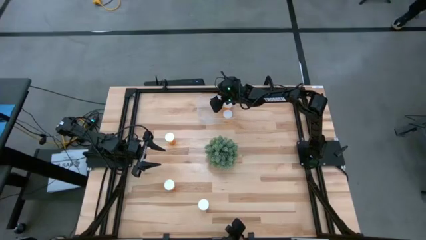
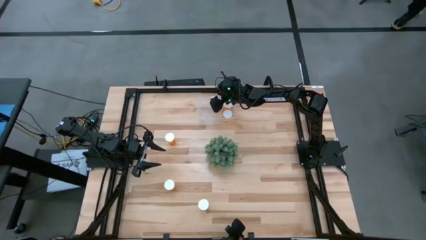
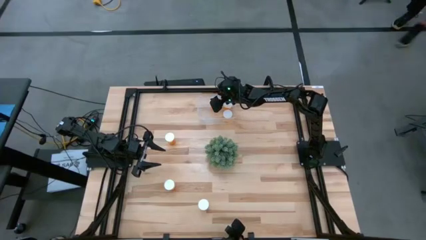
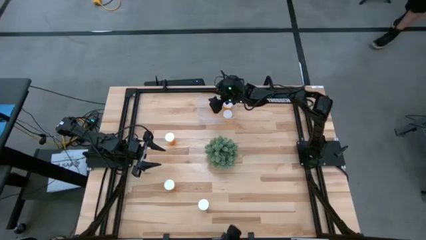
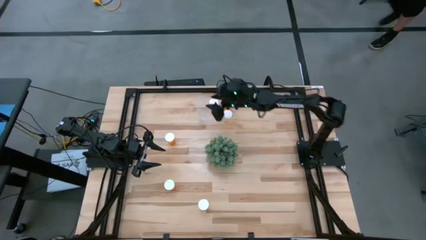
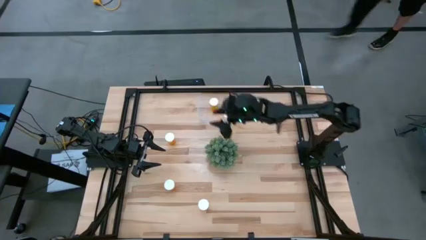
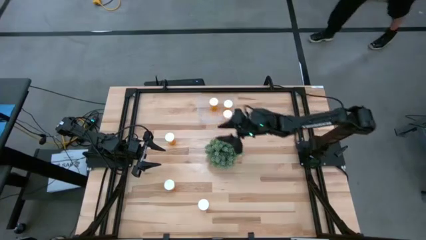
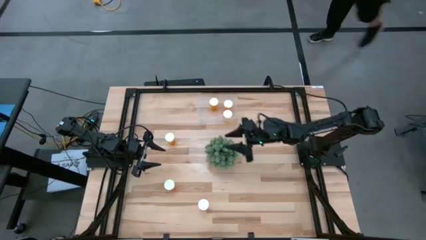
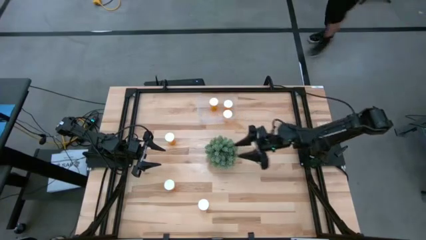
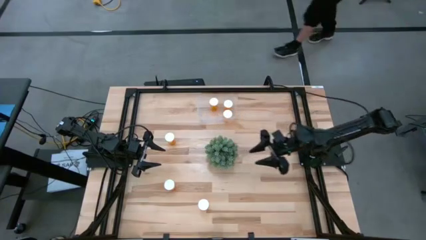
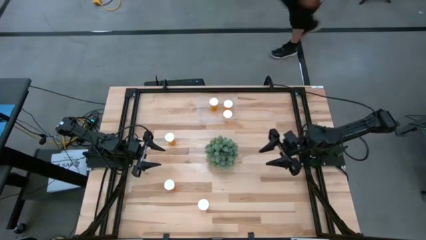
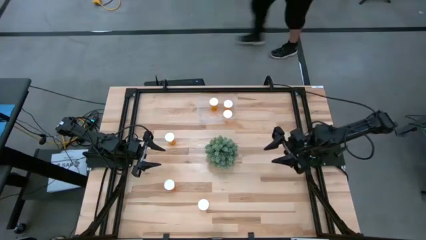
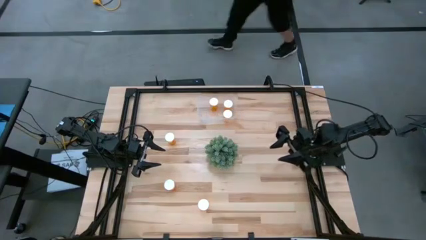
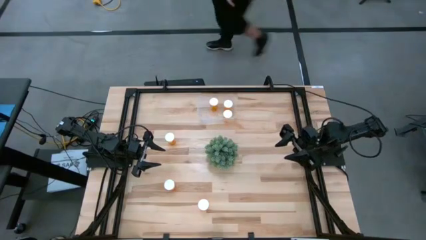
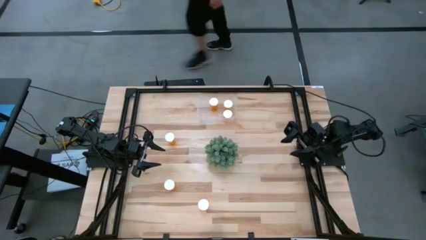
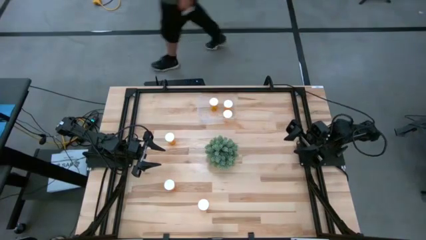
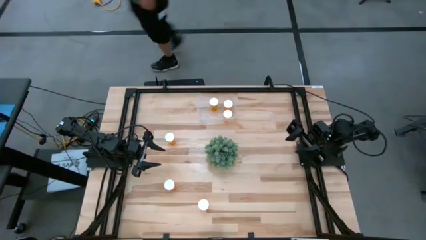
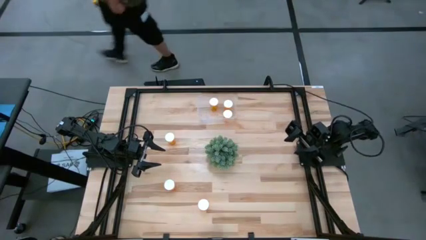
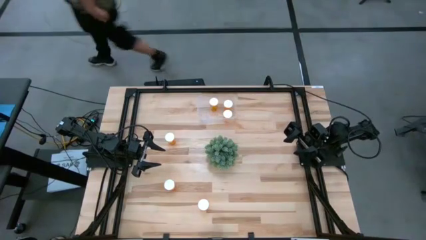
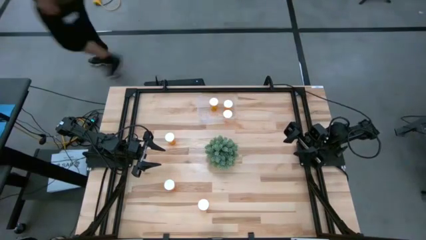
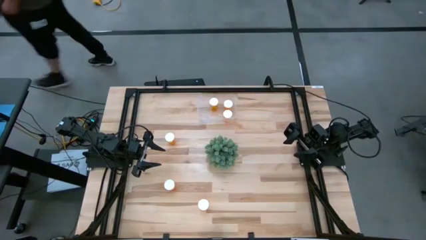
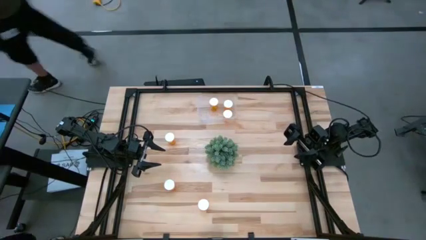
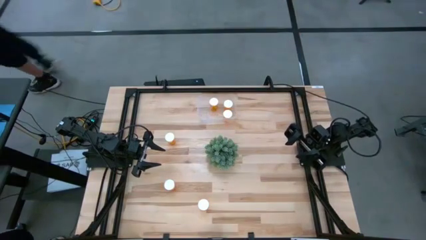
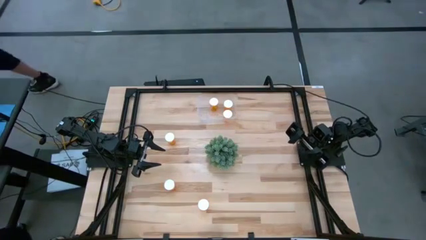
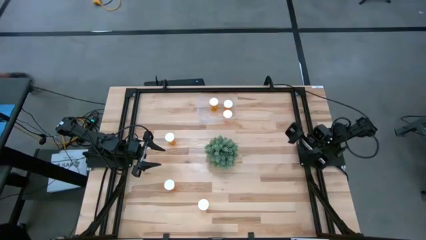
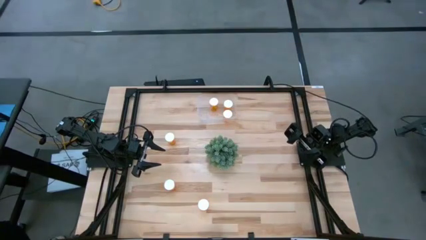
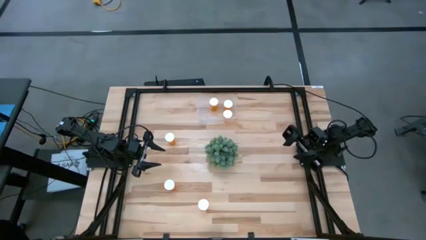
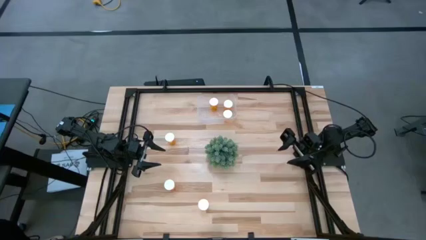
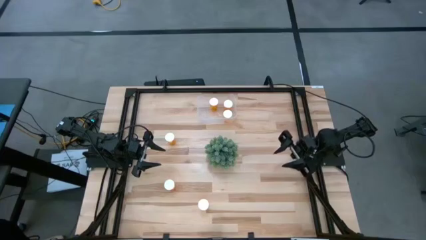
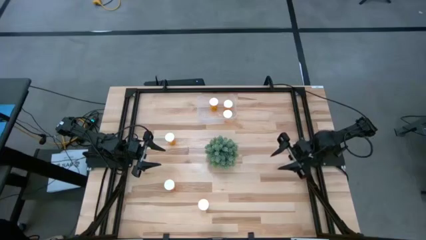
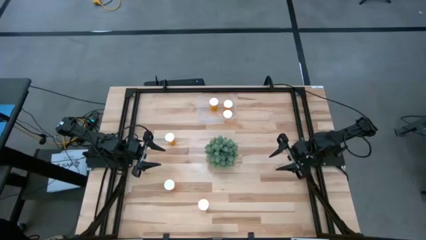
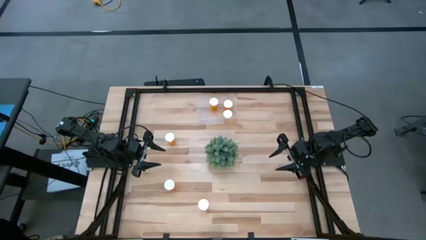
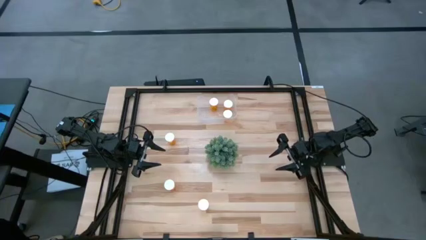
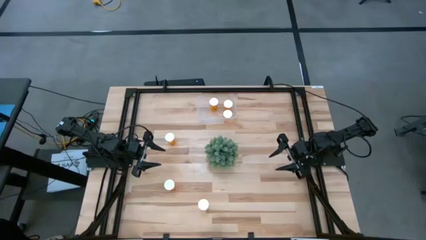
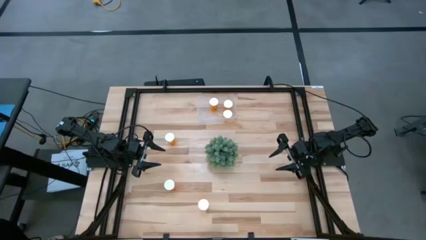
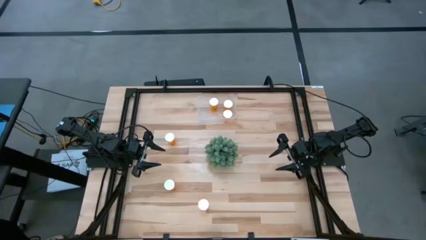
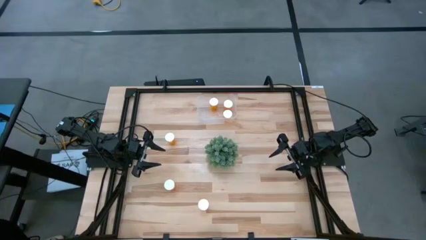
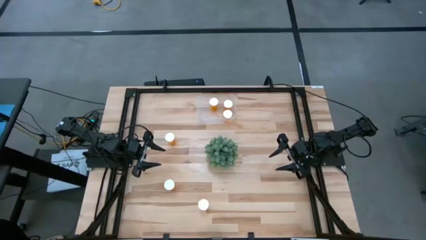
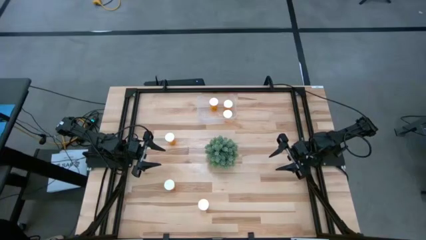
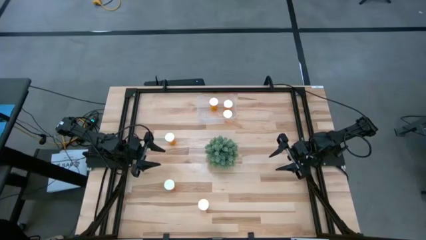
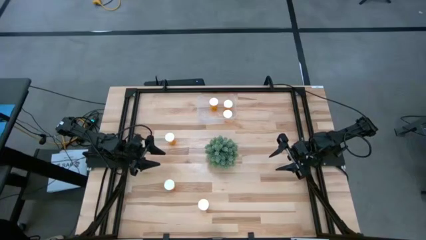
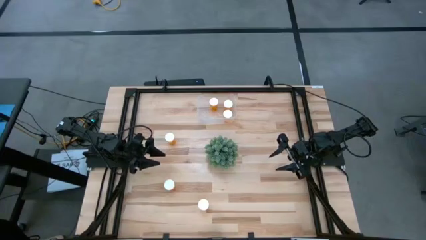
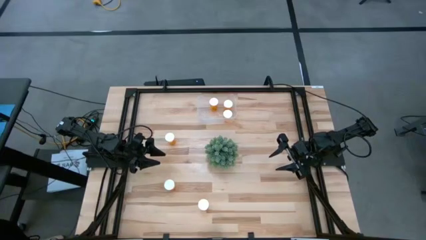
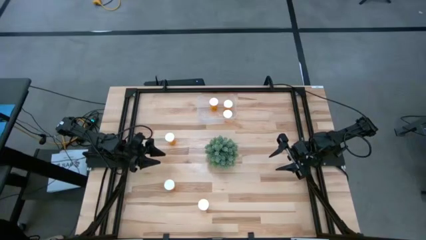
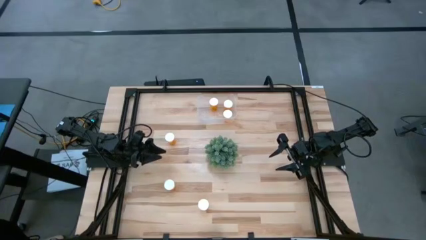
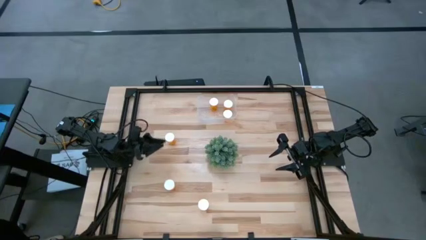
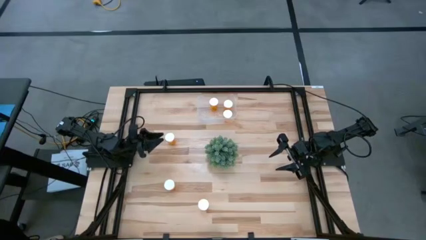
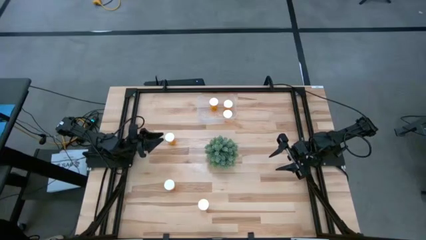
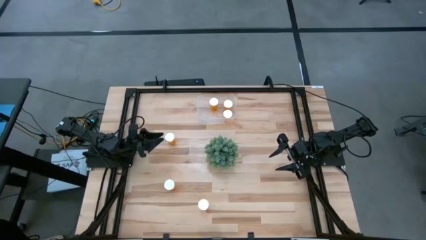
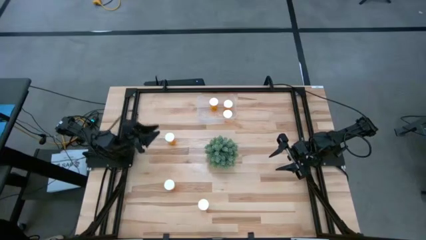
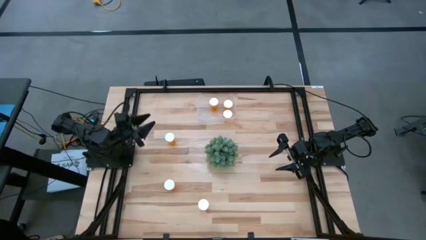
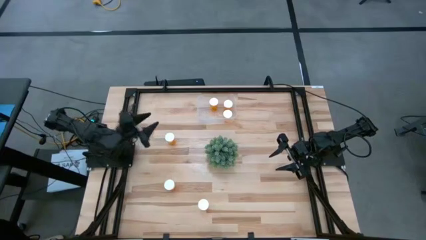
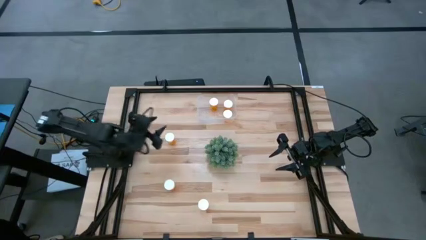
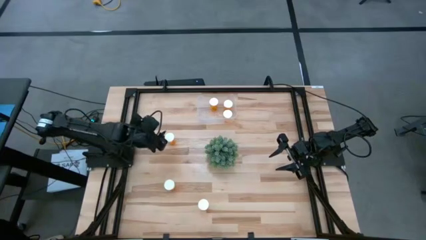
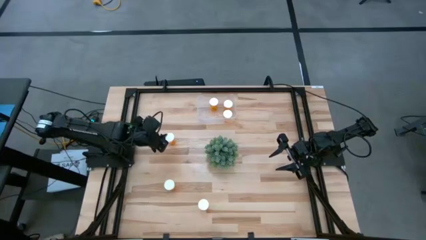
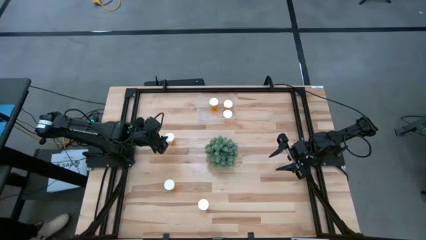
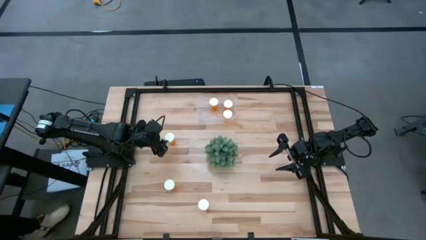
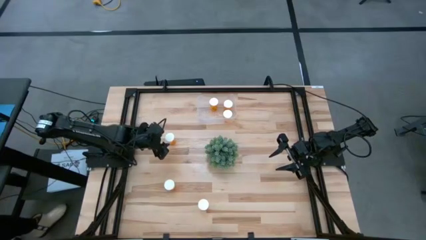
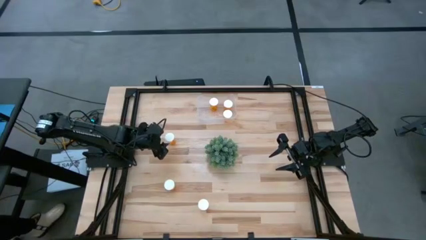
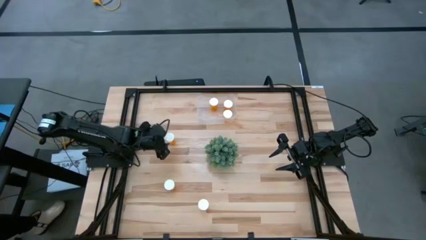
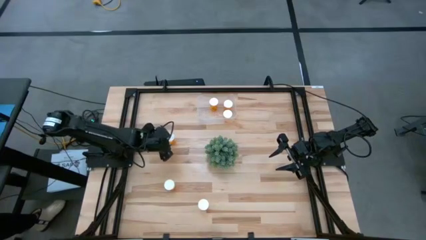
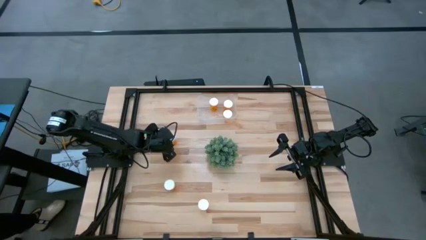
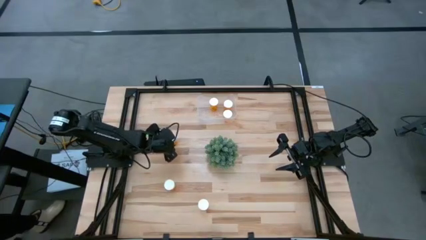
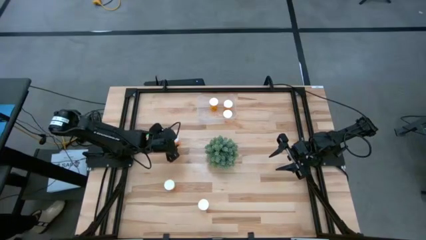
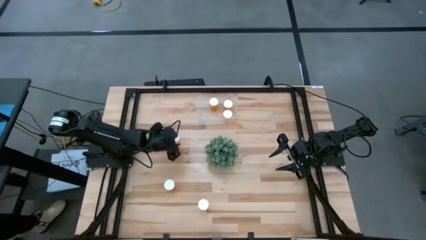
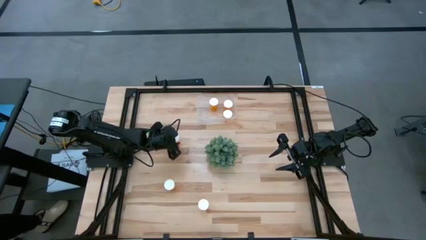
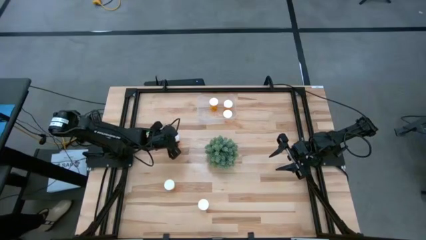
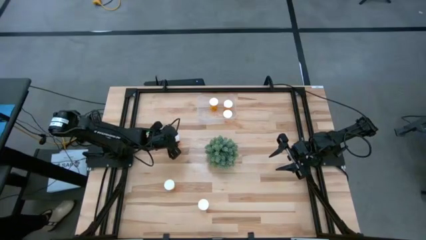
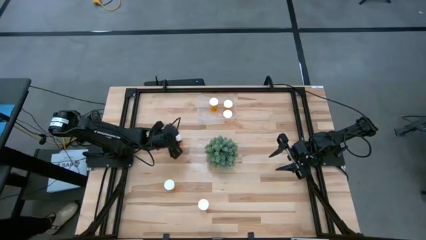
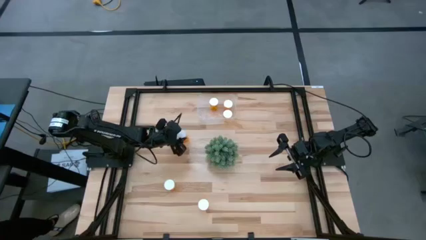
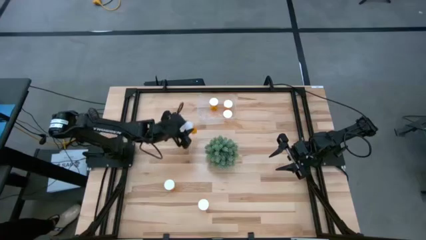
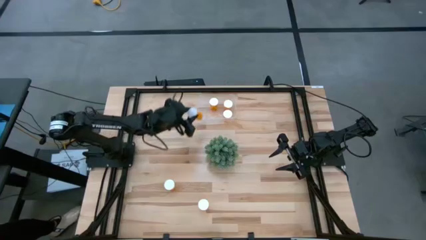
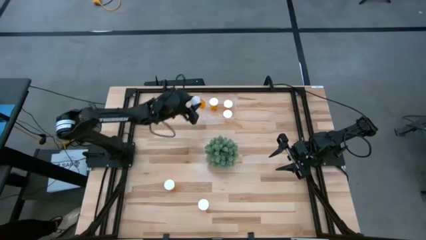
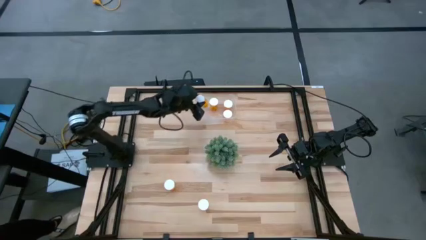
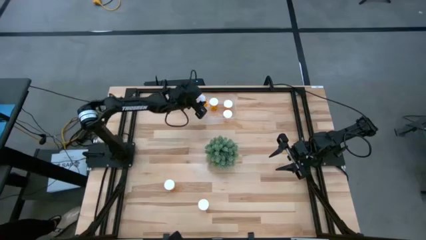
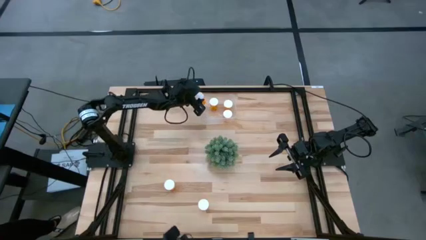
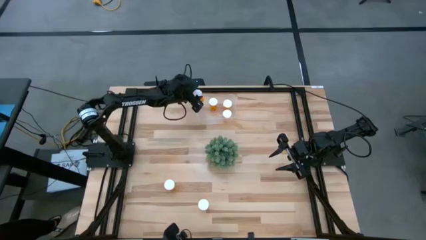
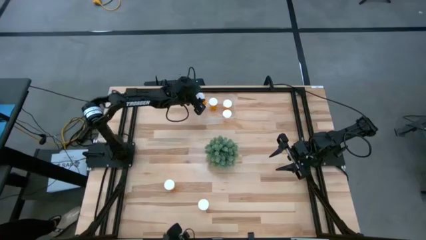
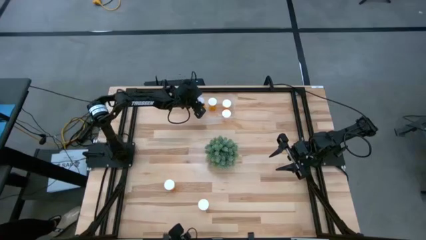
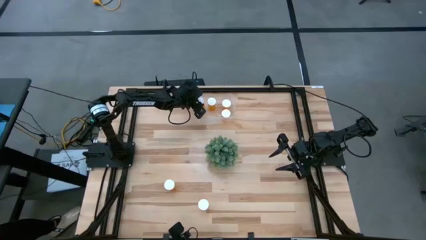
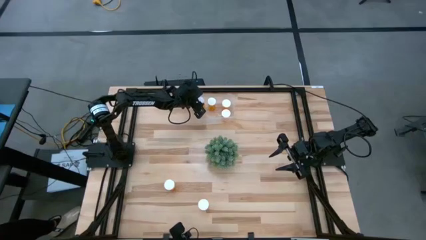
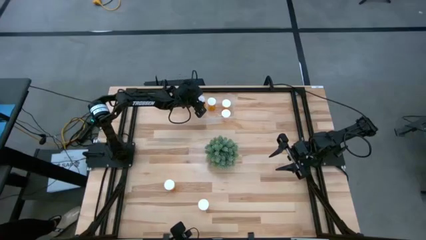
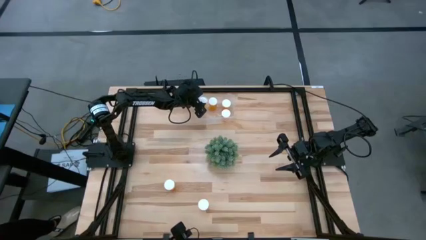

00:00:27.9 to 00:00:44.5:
Task: Pick and place pill bottles into a basket
Put the top orange pill bottle into the transparent bin
